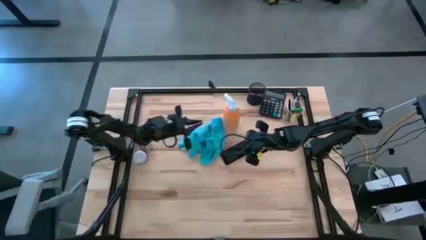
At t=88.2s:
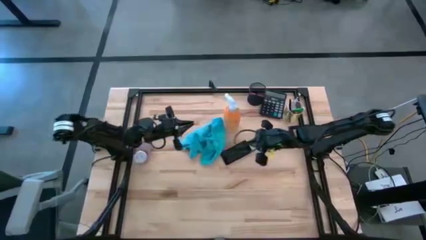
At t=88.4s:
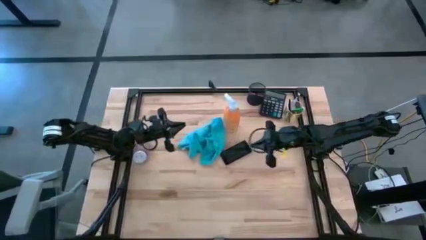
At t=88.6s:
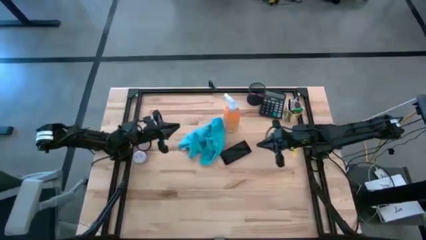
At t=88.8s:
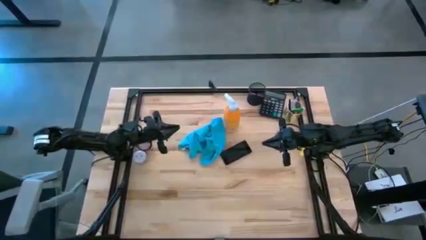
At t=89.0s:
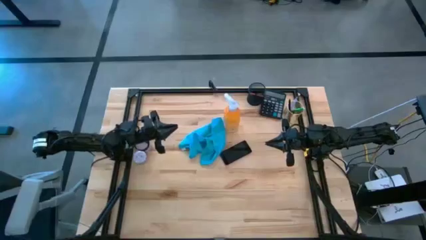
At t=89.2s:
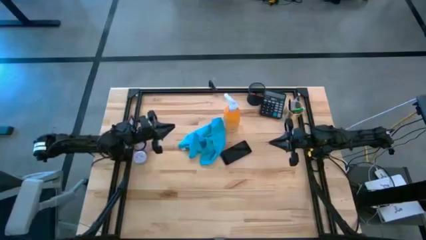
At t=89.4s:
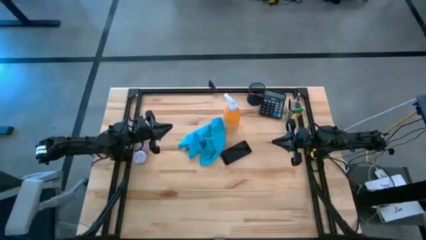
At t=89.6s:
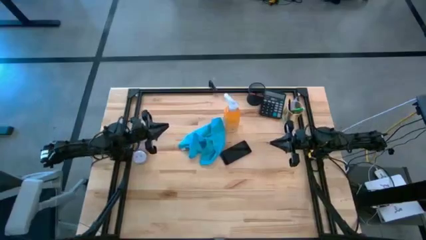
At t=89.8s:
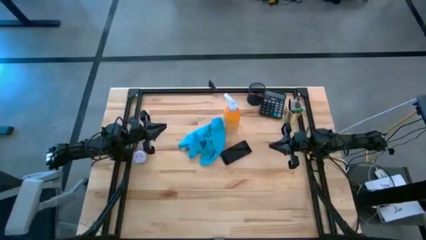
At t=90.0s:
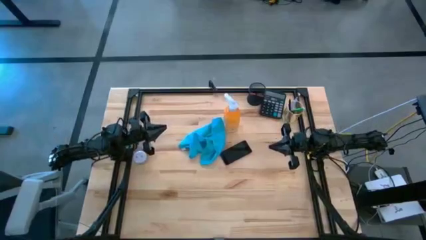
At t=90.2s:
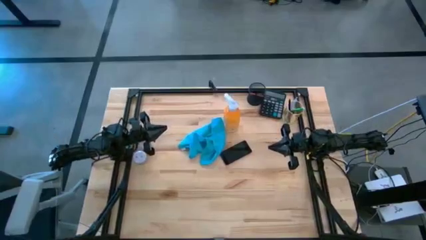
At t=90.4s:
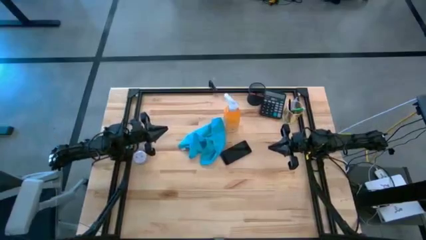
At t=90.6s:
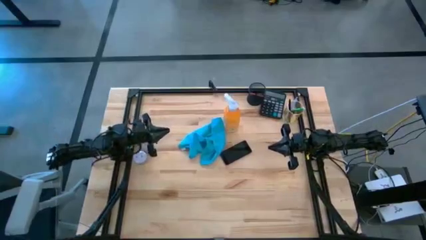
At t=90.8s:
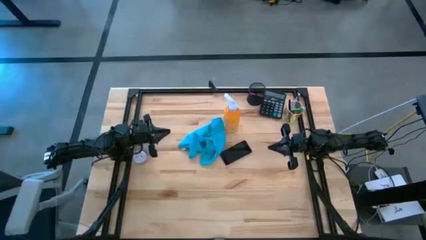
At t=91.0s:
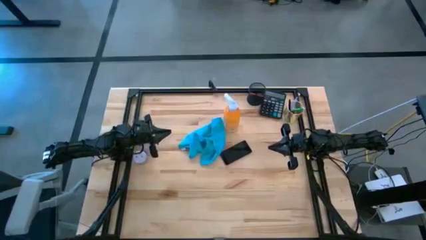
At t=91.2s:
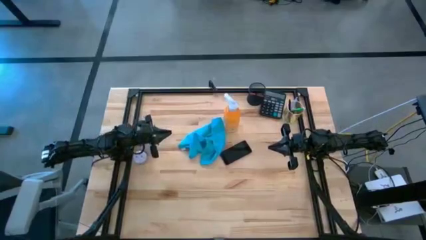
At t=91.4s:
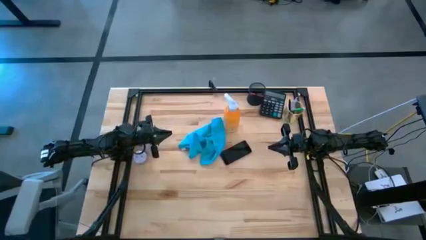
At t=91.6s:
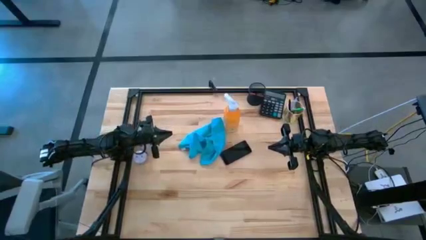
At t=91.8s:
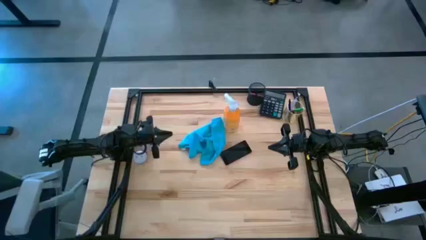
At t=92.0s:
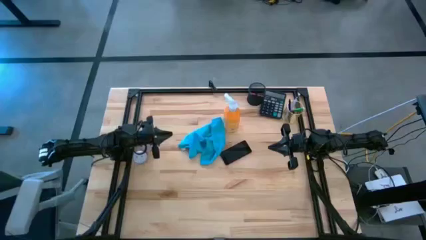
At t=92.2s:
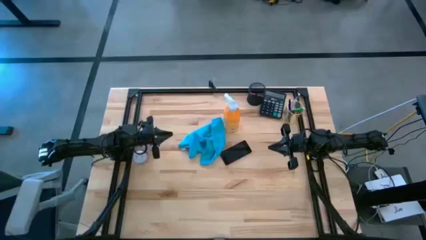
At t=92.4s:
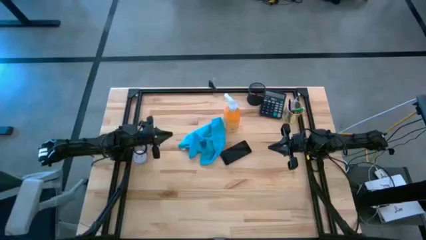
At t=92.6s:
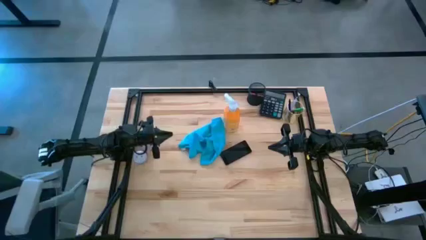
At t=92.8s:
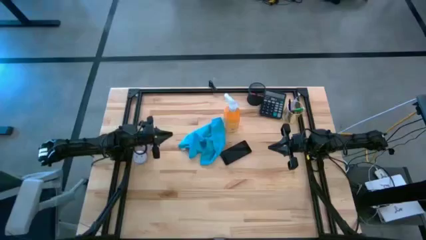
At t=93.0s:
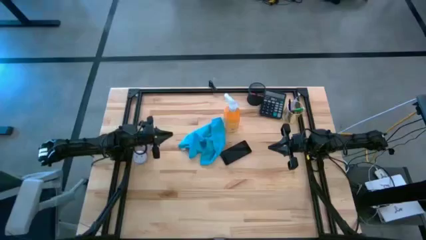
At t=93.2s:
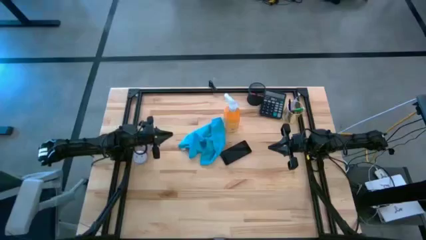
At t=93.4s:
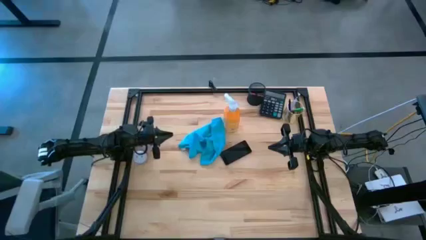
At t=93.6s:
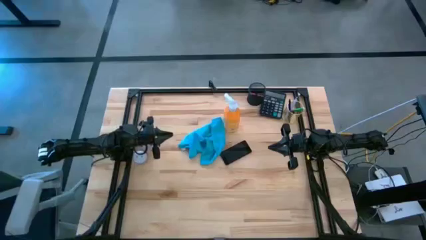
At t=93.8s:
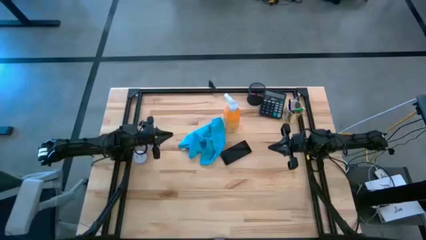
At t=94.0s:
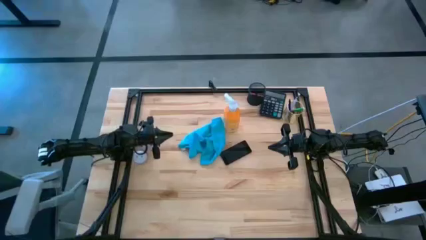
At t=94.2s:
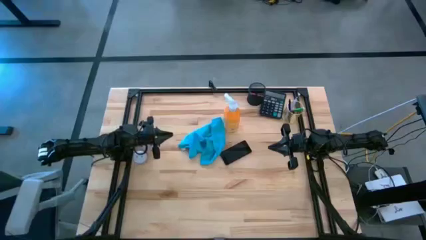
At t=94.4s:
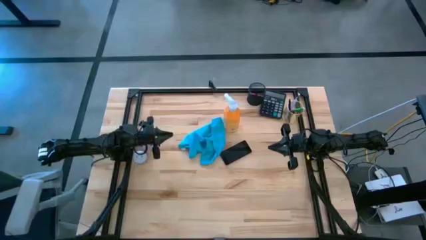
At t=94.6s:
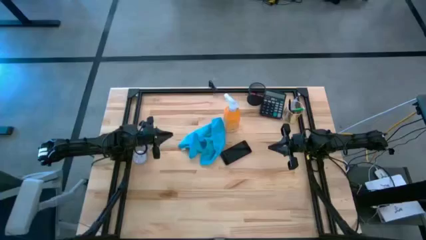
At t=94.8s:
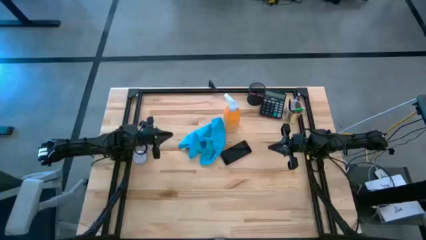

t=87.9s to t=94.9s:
Task: Apply microfiber cloth
Return to Home Position

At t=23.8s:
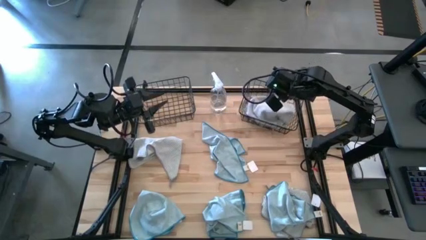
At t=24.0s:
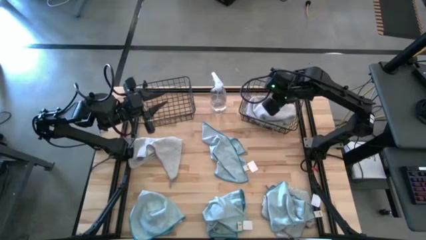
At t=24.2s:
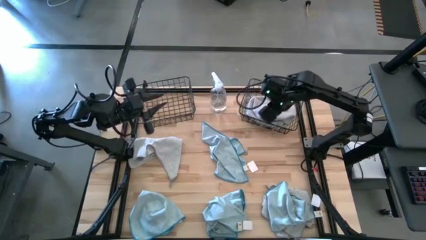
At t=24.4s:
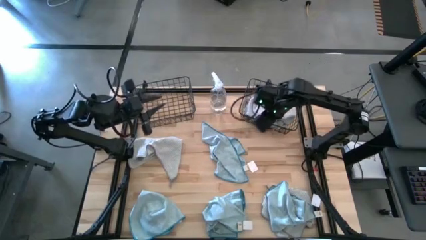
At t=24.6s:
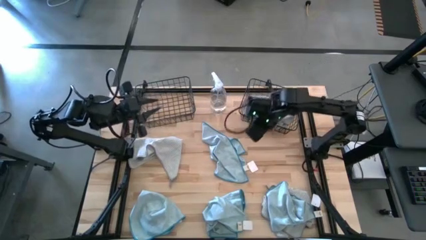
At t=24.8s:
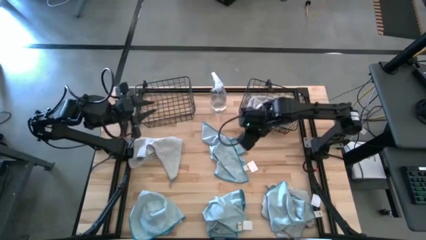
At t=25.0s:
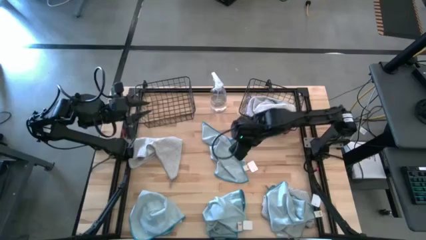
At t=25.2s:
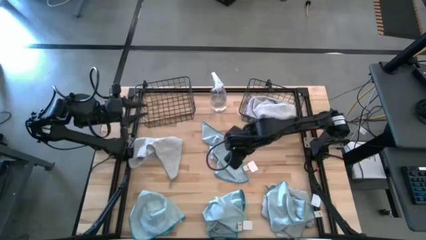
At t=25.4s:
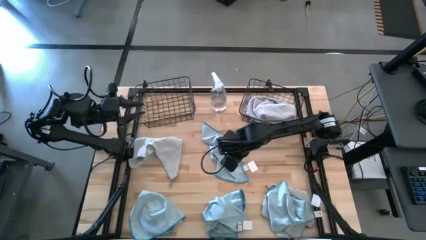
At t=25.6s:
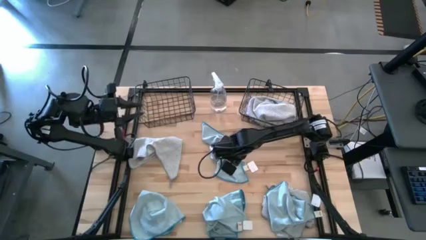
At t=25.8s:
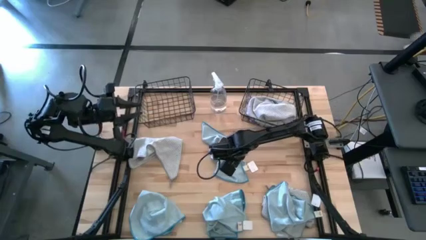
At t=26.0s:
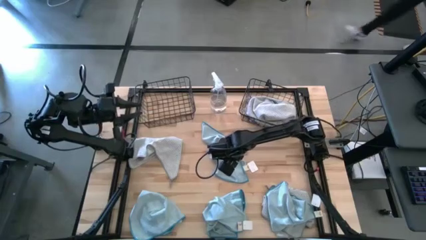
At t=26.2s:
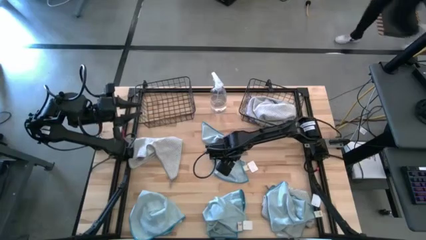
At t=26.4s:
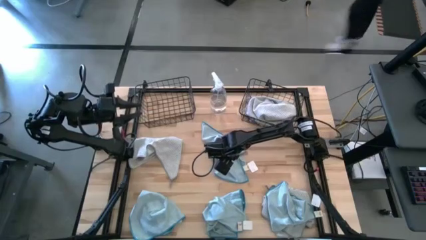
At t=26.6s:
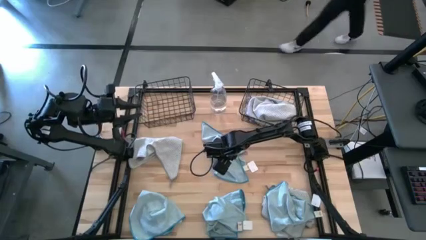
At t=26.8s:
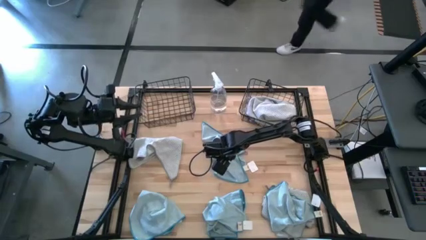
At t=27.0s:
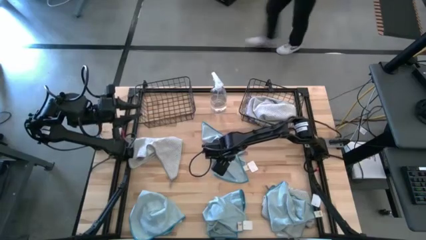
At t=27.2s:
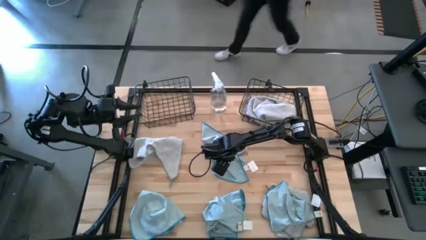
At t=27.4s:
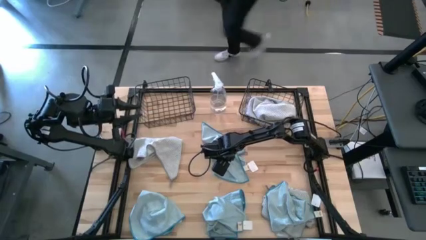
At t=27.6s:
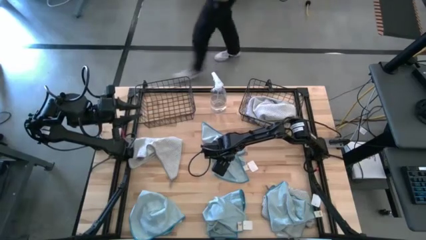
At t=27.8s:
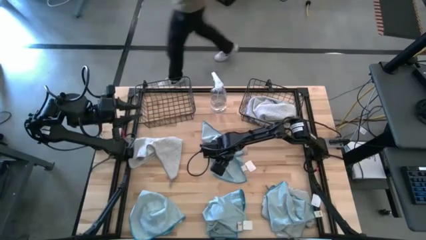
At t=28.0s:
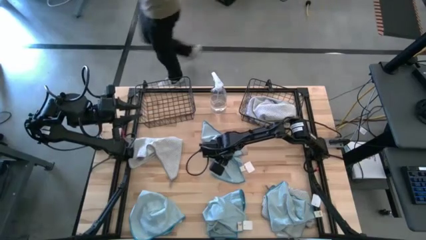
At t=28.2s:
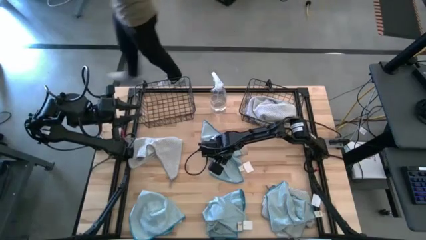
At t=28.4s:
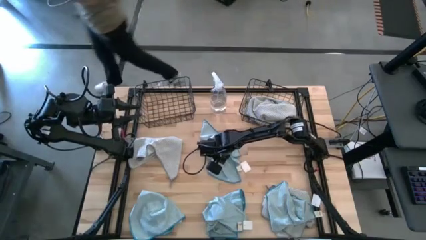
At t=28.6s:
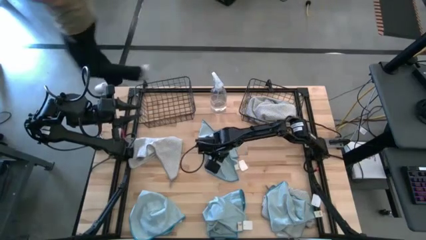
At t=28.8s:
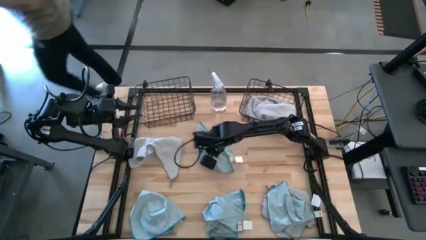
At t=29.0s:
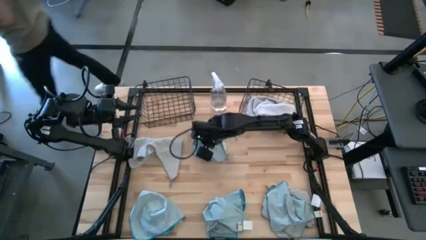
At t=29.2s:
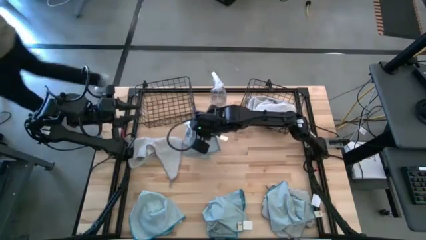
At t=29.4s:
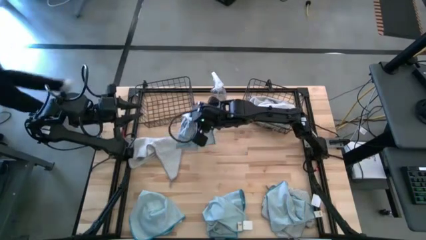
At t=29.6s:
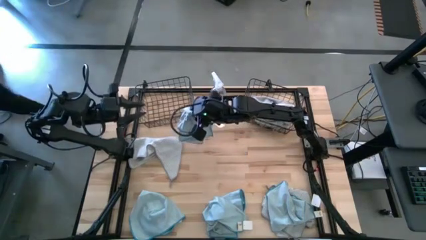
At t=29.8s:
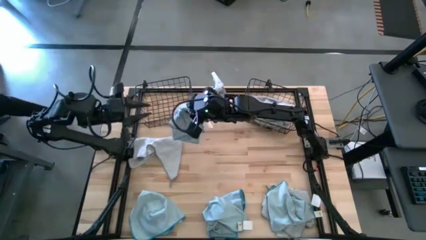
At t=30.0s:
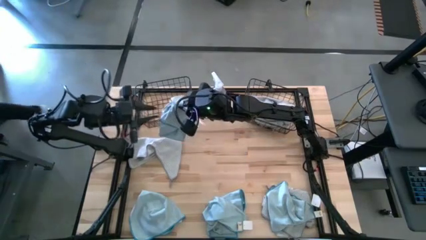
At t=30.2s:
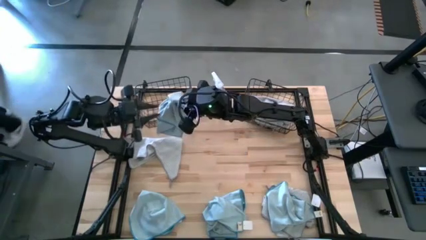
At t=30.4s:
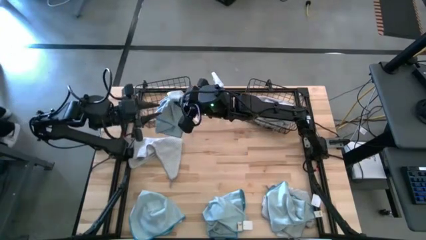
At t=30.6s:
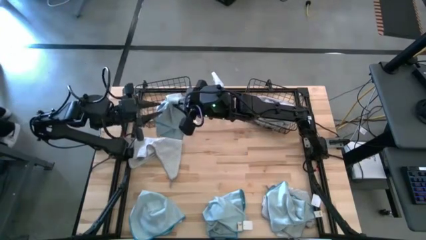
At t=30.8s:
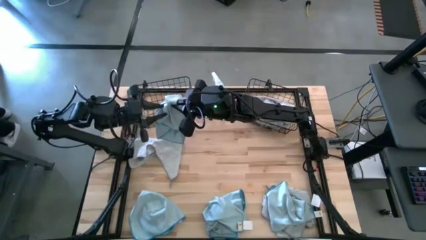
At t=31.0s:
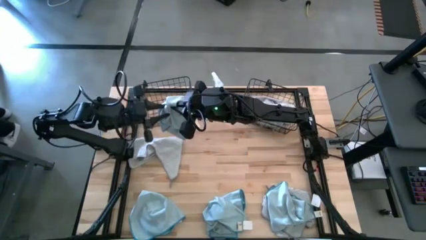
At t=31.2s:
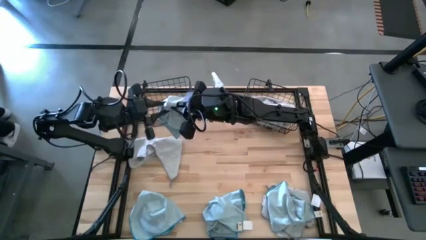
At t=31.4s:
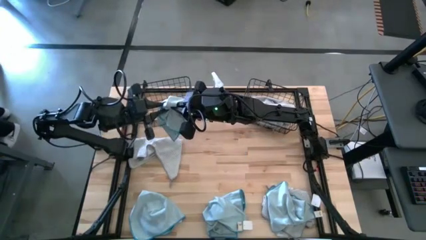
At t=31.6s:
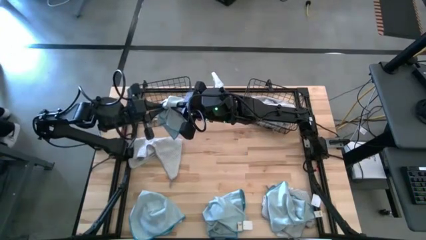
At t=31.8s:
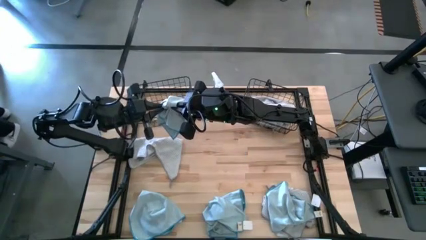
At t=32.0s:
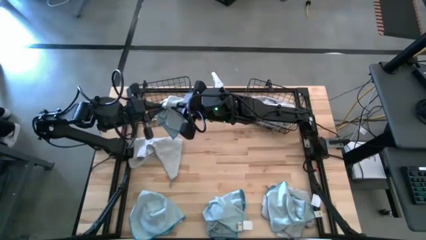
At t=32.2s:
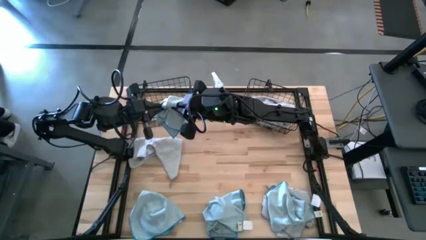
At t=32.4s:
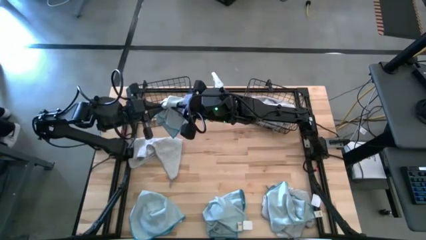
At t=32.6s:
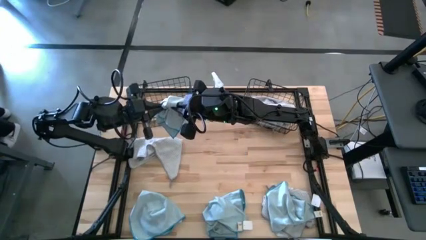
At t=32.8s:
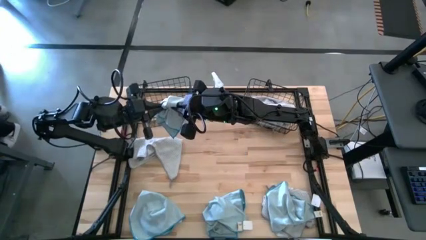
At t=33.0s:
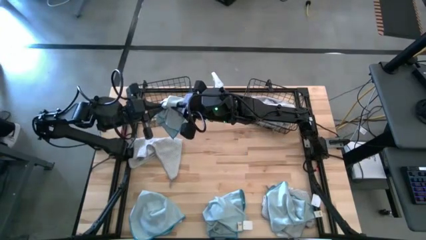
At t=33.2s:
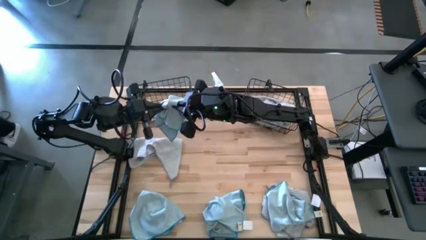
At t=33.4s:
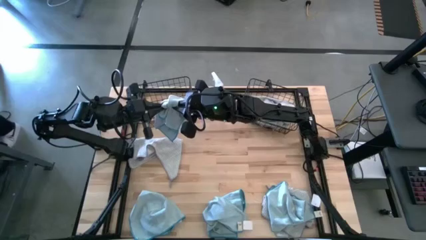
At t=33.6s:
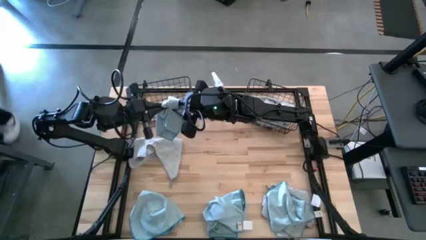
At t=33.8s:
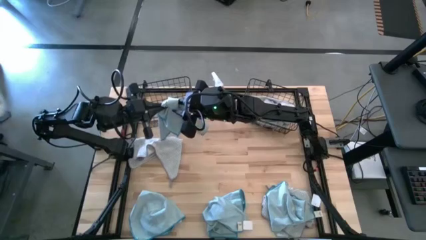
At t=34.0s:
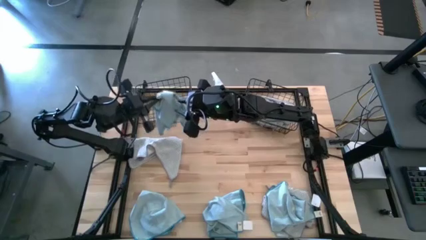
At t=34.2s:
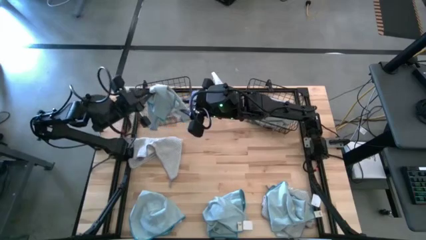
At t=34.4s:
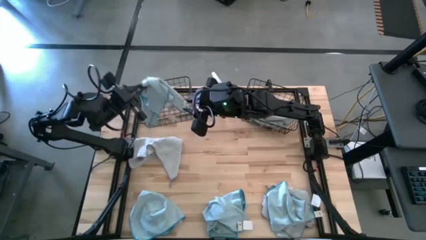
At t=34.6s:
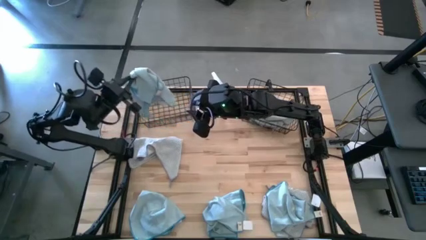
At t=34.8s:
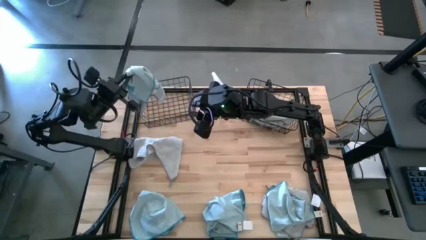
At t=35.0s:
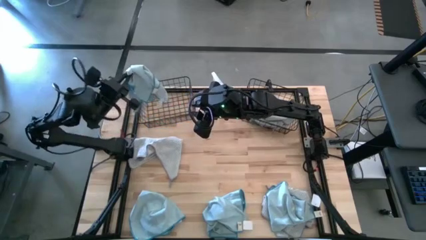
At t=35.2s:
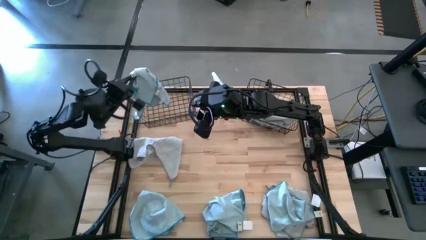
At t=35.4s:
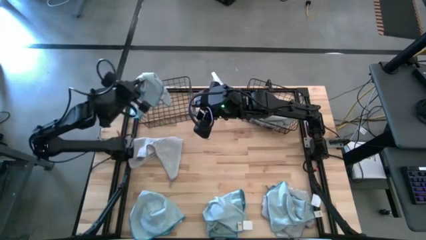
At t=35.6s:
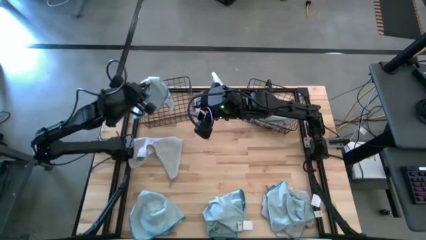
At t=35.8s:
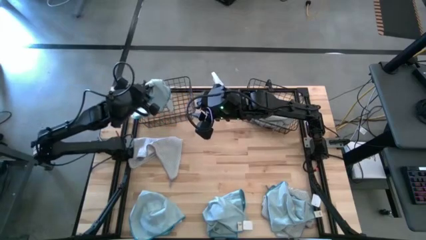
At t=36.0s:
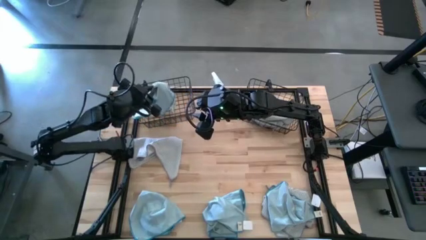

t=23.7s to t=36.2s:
Task: Sort microfiber towel by color & place in baskets
Put the blue microfiber towel into the left black wire basket
